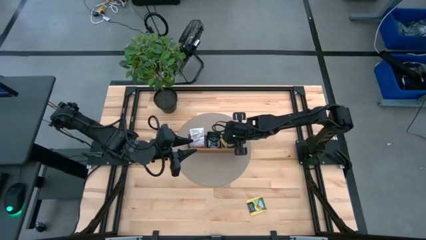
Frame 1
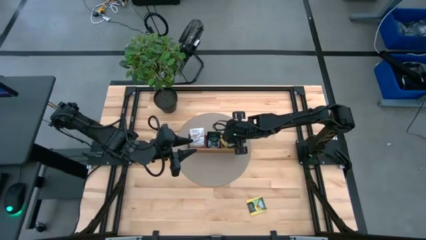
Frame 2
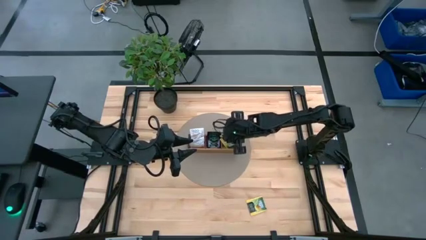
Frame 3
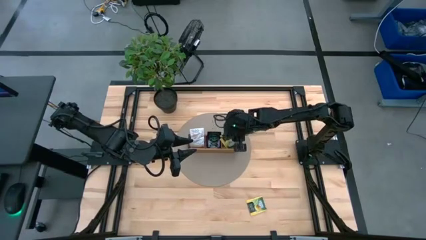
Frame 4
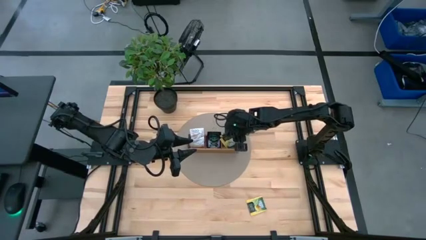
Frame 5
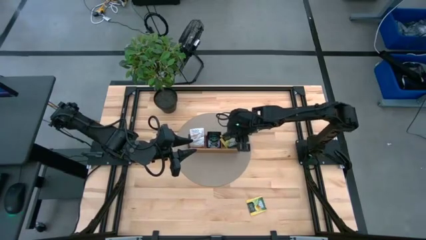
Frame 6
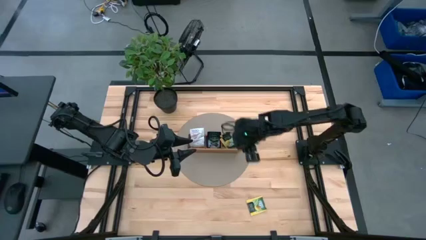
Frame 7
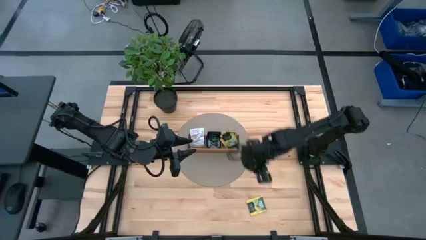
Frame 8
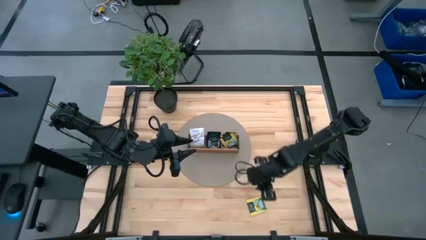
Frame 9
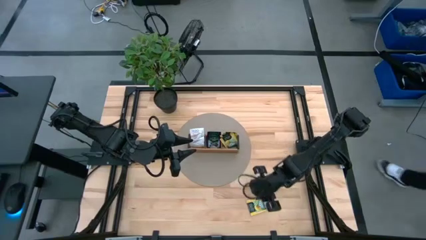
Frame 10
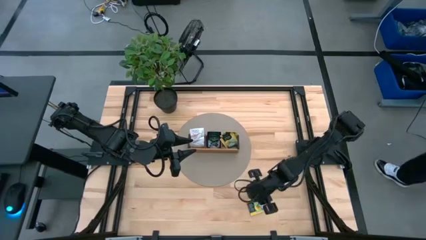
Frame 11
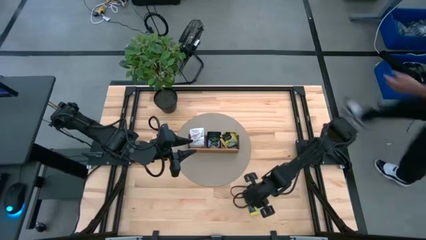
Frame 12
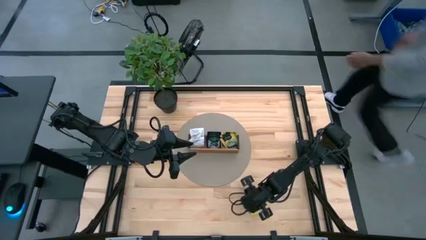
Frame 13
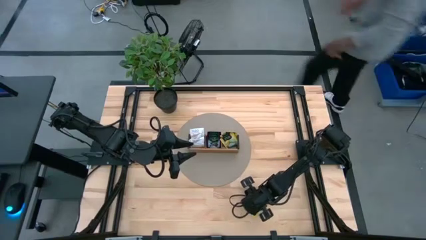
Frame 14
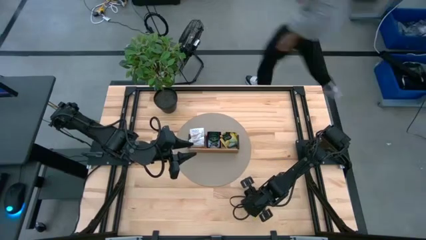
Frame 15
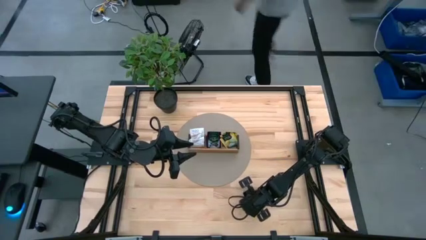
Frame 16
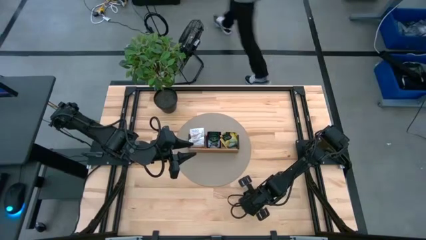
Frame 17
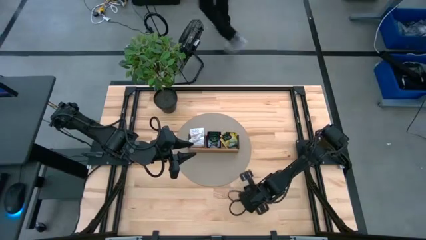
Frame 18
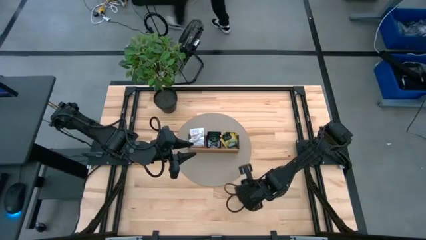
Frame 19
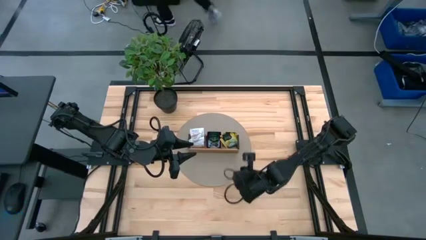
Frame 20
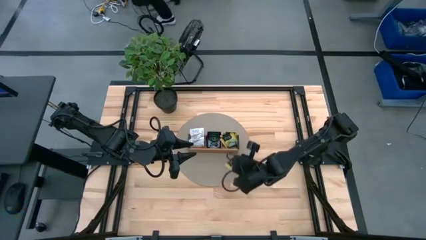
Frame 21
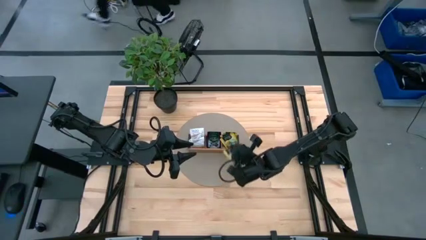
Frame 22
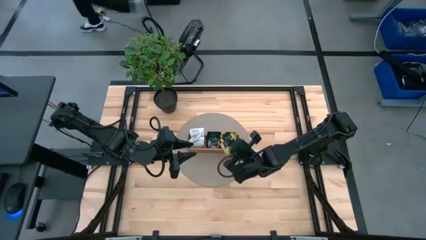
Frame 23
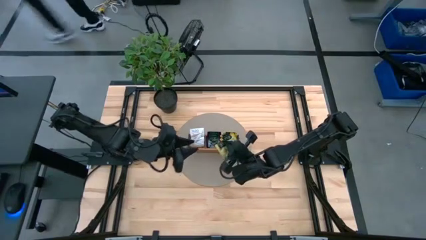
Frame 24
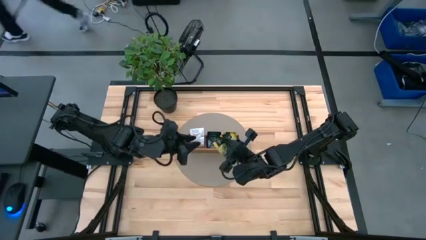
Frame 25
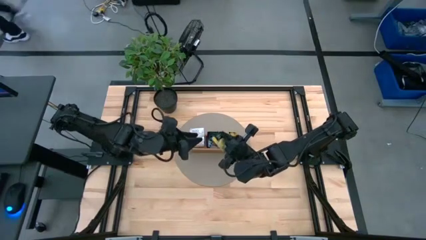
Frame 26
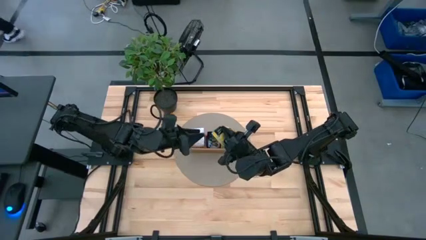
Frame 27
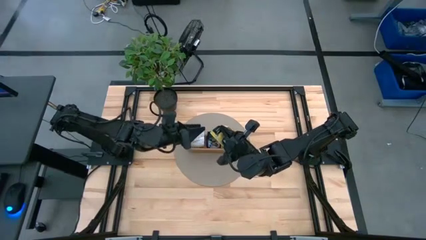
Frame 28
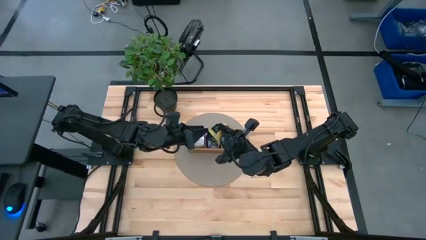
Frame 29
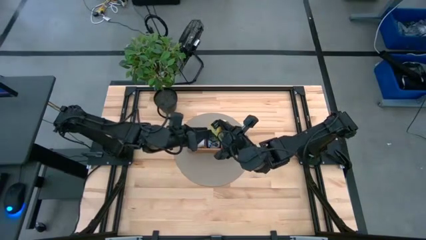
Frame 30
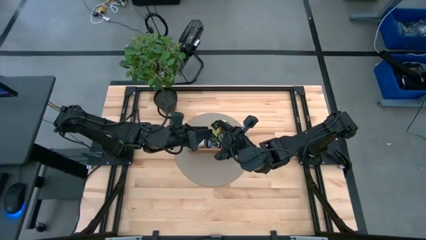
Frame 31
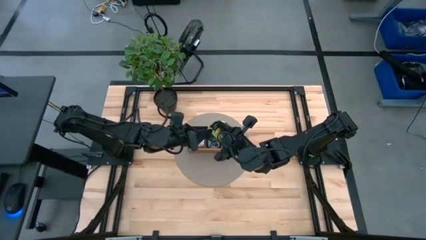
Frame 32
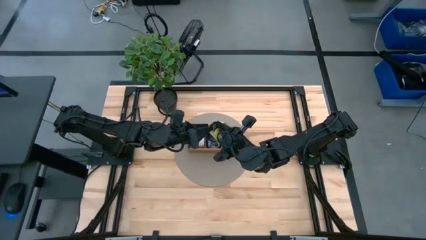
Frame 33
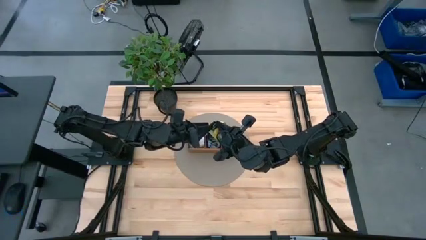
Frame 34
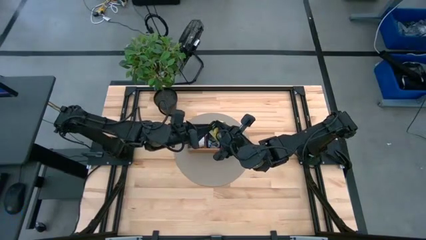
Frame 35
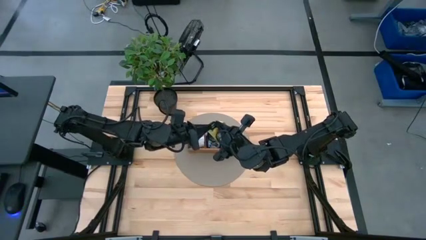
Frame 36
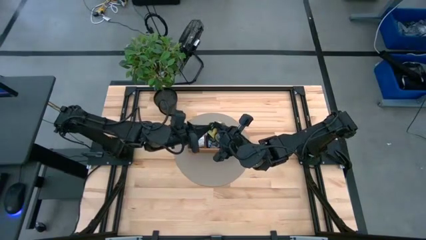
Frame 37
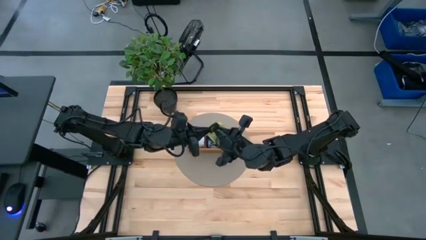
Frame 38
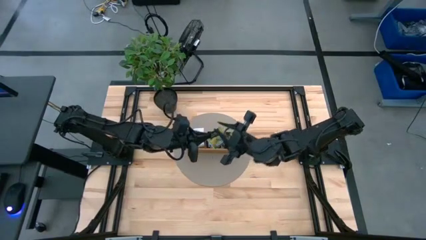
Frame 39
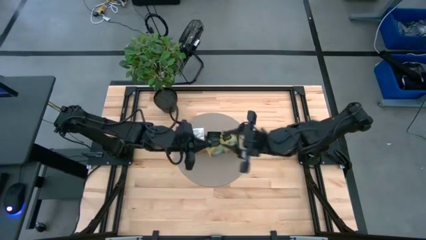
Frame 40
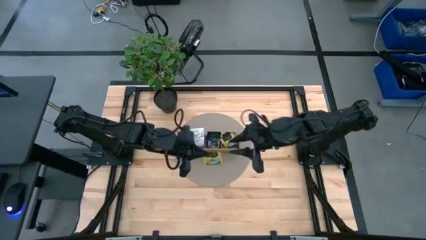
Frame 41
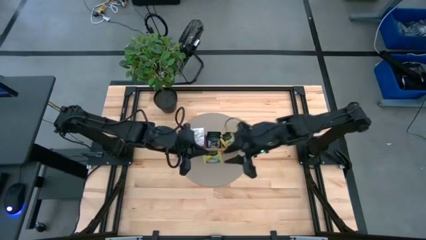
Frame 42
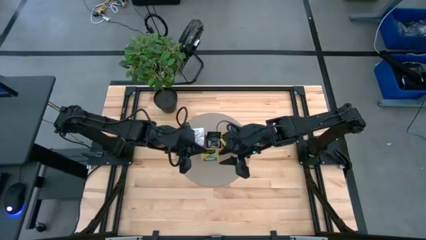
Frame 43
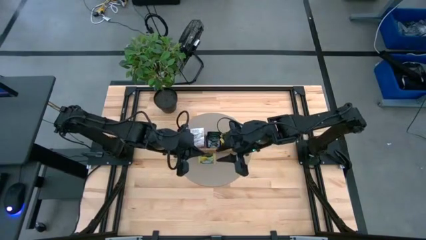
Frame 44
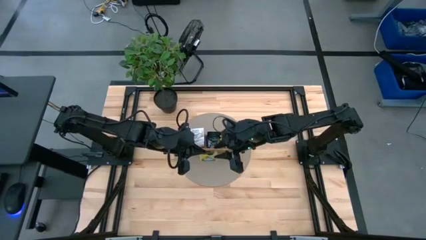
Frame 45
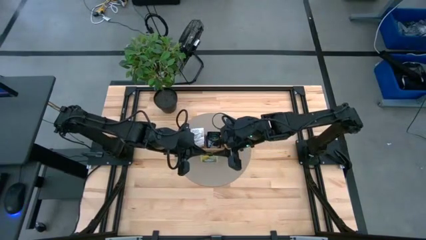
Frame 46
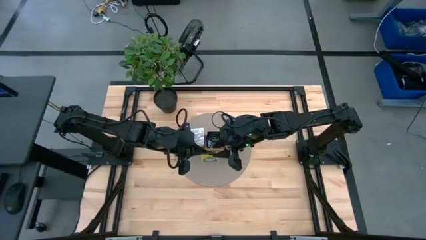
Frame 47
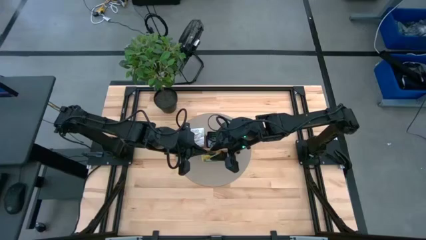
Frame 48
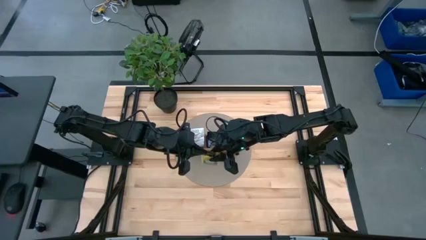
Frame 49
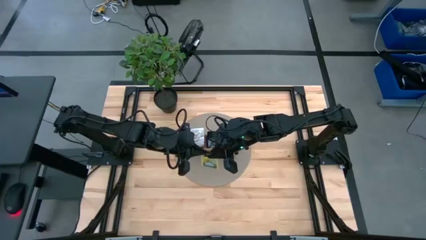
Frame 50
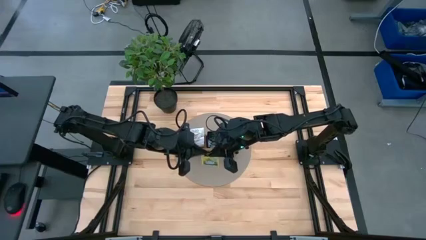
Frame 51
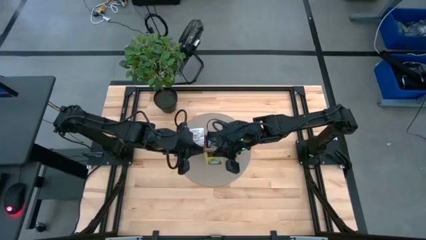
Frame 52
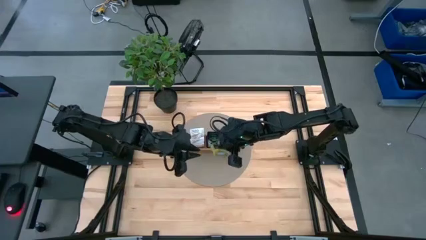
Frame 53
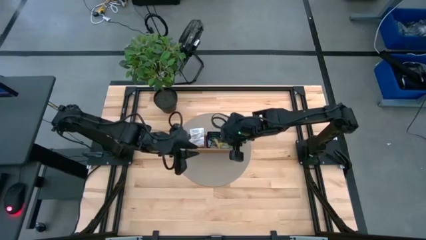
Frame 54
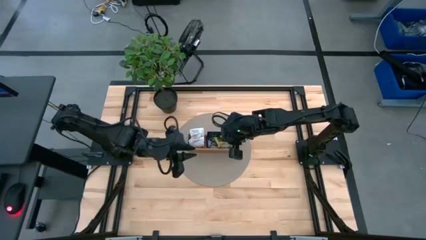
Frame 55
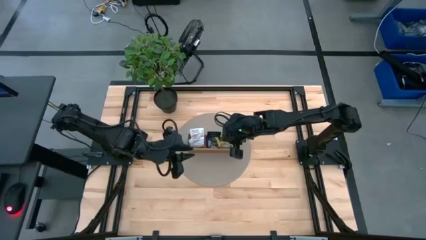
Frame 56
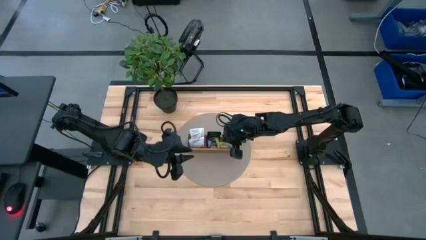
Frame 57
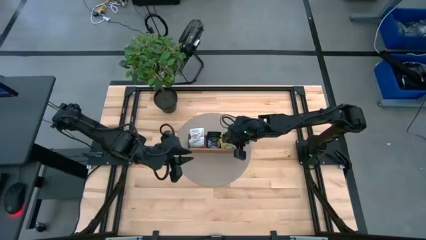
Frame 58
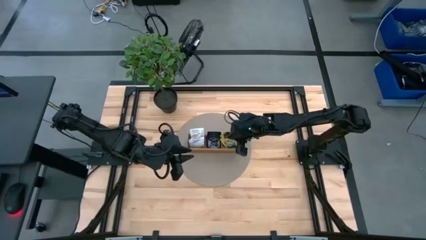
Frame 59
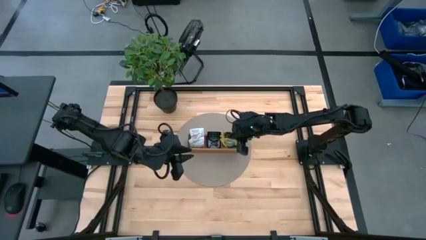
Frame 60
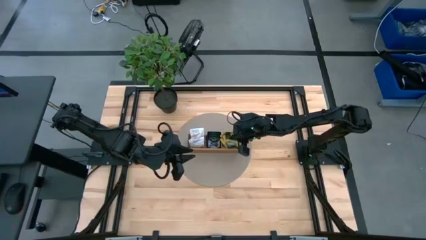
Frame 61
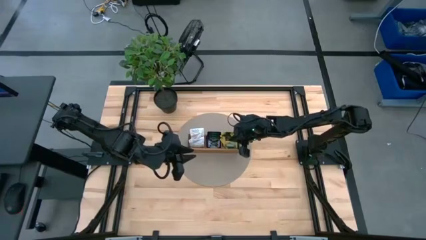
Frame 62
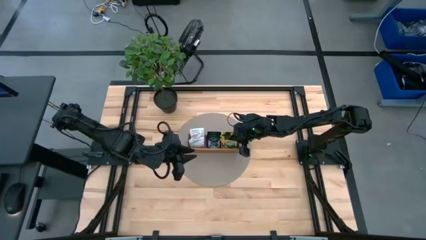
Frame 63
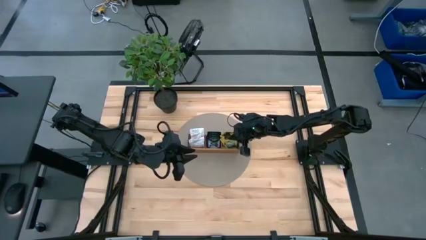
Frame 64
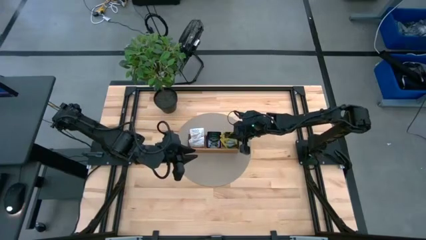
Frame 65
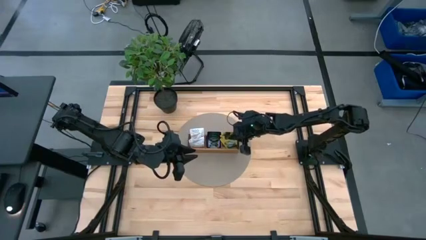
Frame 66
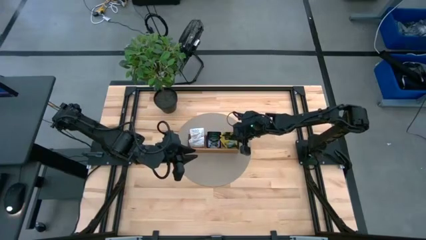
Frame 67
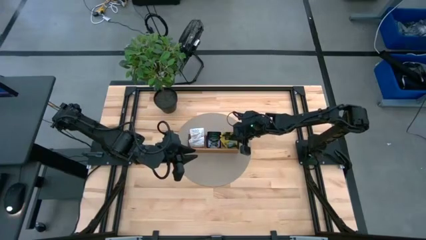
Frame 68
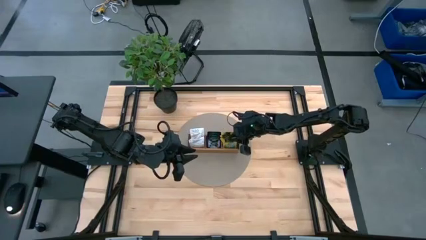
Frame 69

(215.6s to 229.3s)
Task: Pick & Place Tea
Put the yellow tea bag into the right section of the wooden organizer

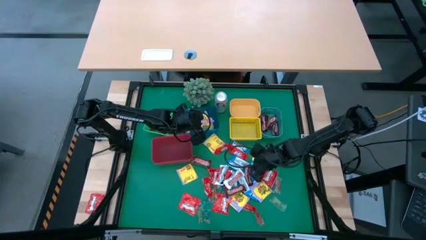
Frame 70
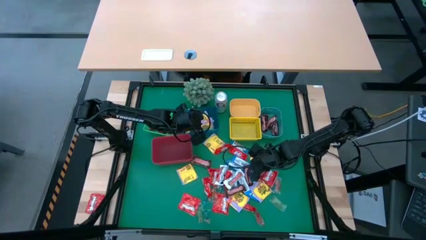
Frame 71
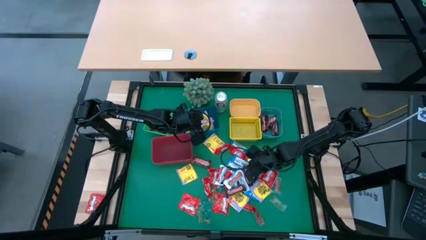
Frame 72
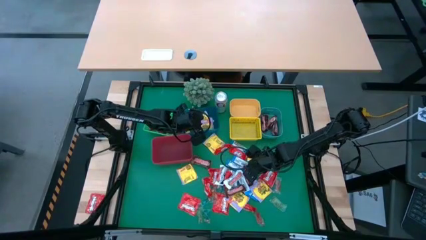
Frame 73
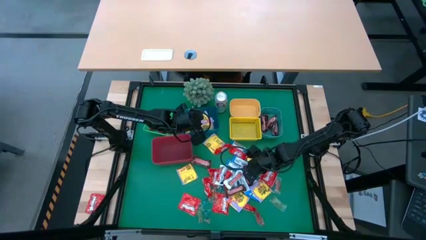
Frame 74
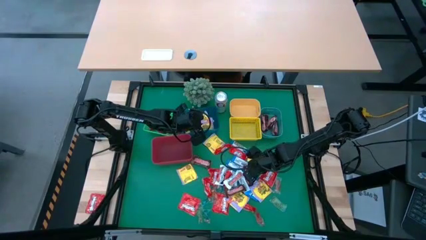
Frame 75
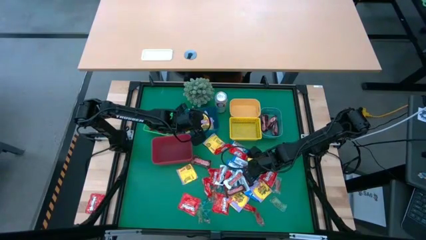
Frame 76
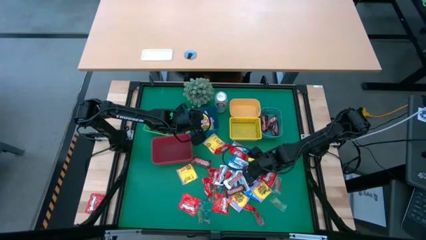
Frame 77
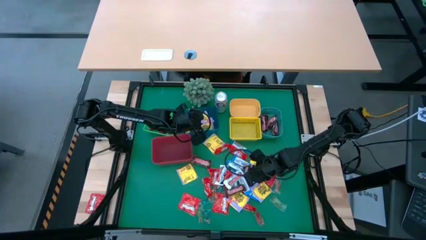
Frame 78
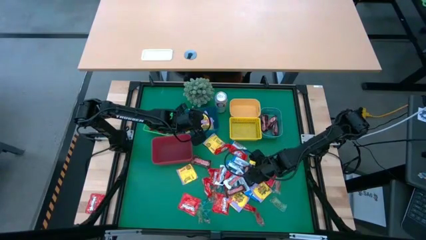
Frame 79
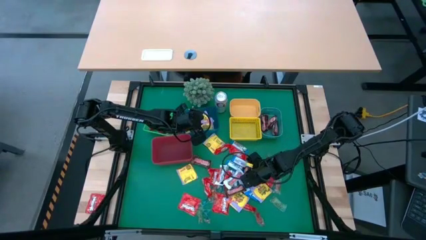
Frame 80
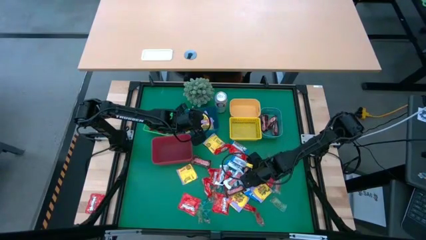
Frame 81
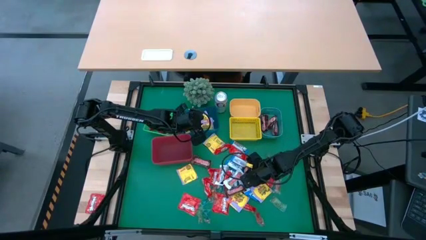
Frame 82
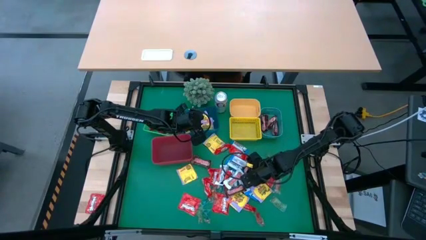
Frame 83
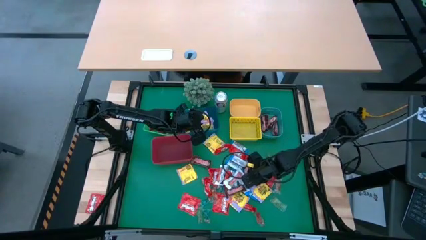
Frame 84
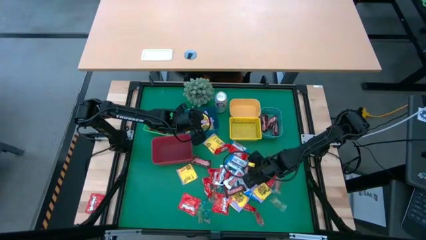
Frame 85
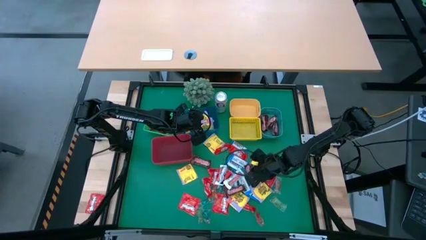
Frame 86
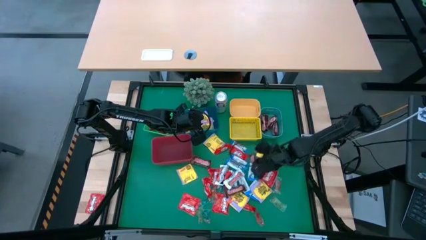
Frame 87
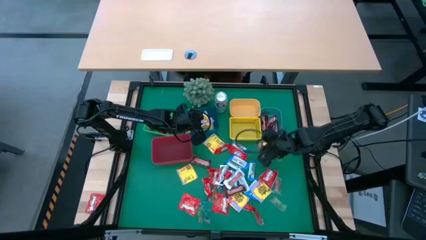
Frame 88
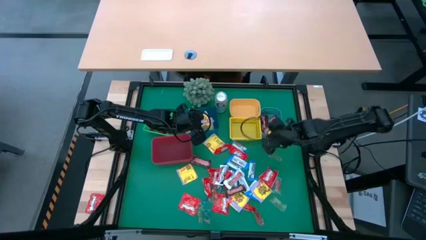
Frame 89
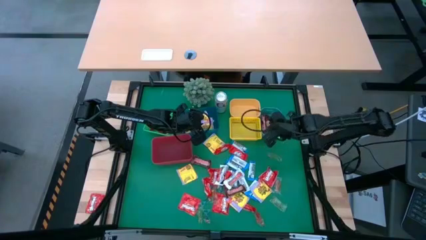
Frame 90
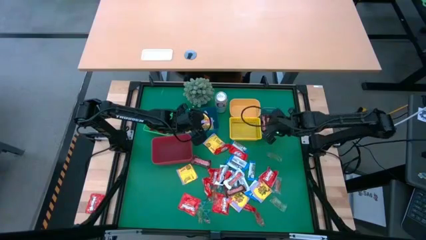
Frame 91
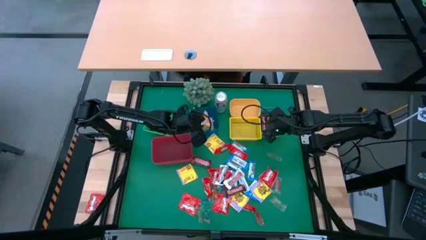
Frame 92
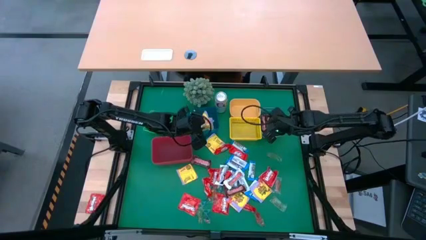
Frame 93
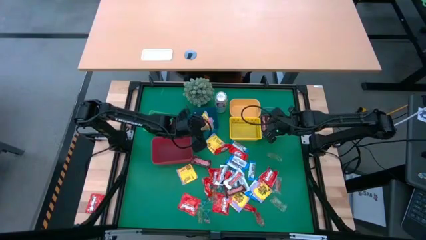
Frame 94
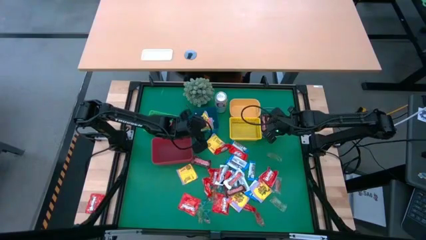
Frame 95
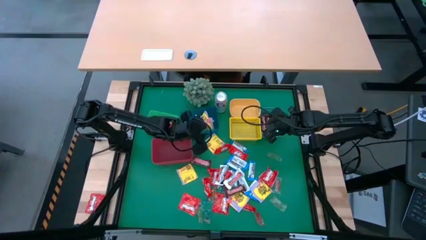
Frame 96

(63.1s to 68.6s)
Task: Sort candy
Put the brown candy bar into the green bin
